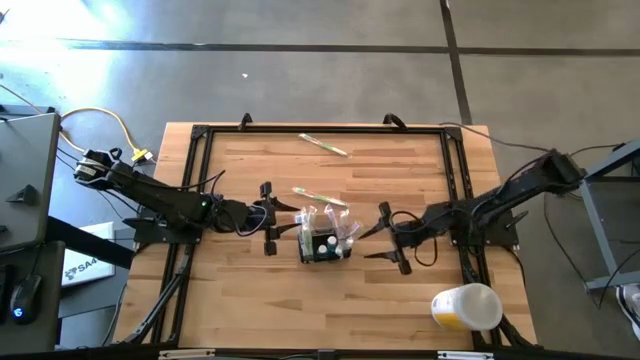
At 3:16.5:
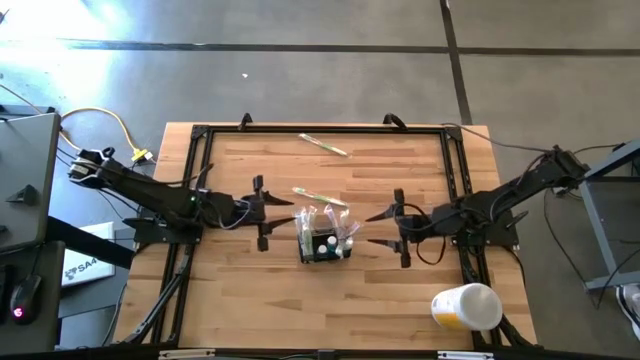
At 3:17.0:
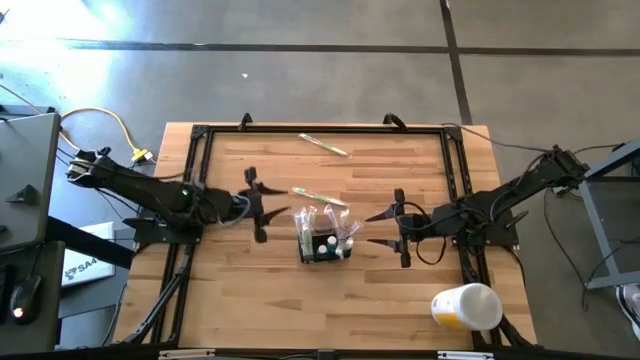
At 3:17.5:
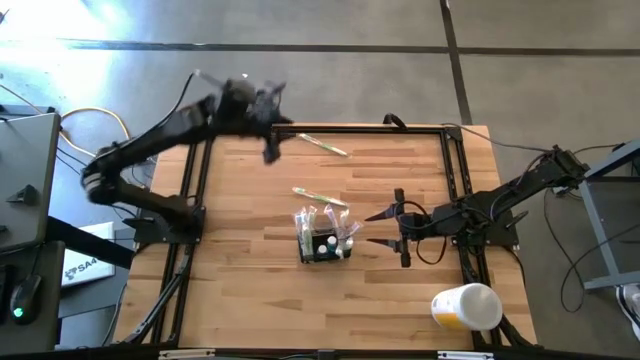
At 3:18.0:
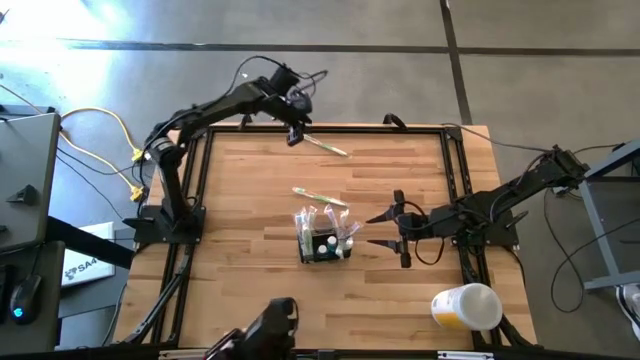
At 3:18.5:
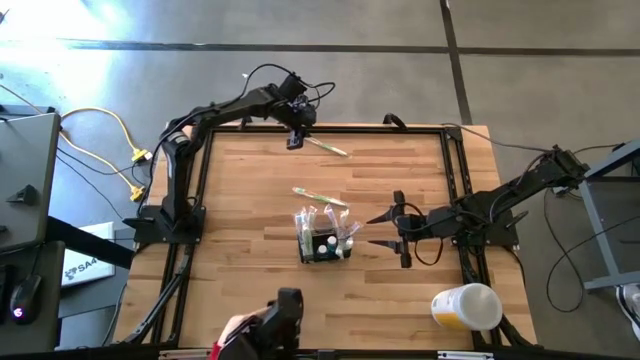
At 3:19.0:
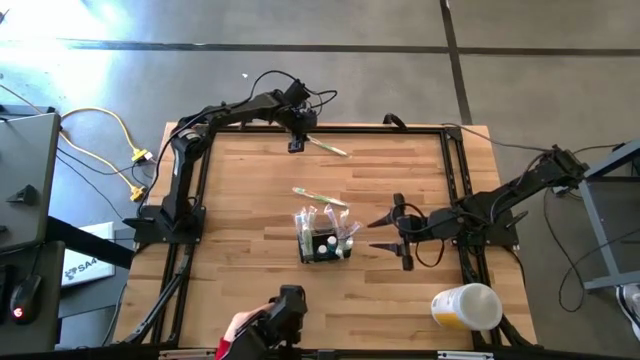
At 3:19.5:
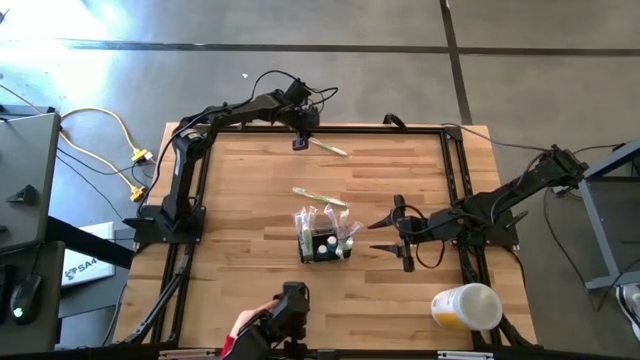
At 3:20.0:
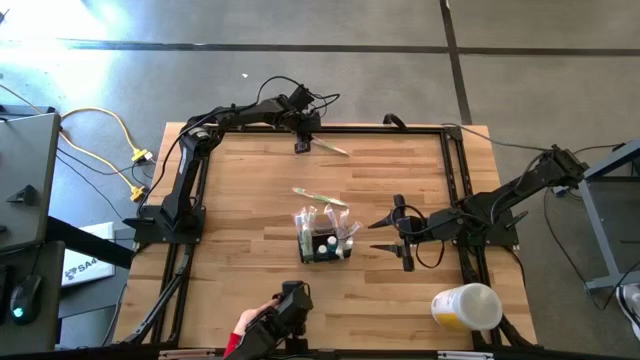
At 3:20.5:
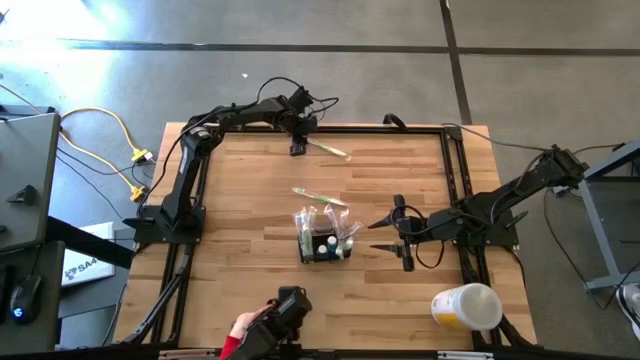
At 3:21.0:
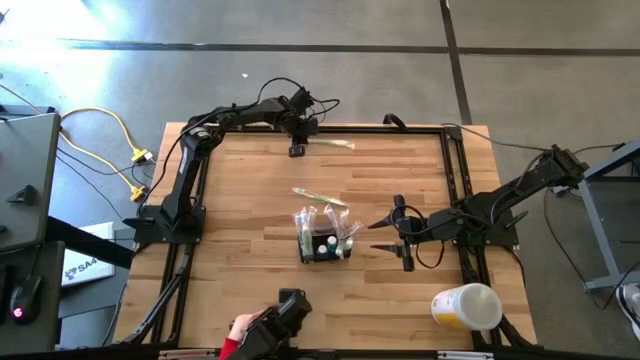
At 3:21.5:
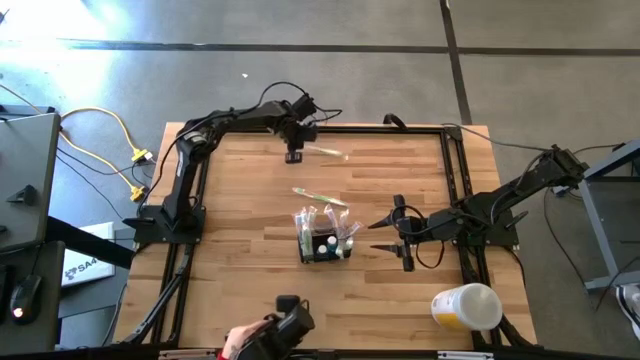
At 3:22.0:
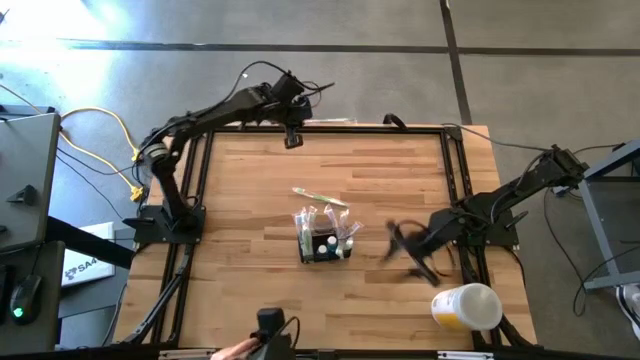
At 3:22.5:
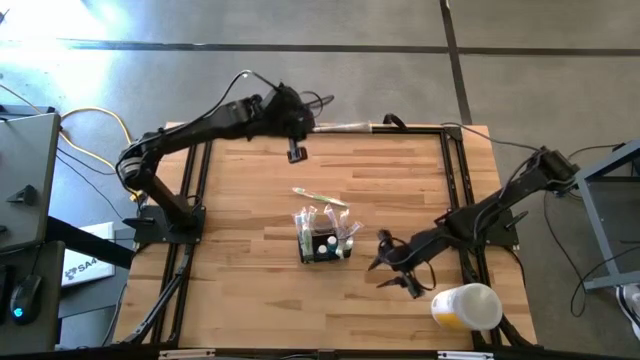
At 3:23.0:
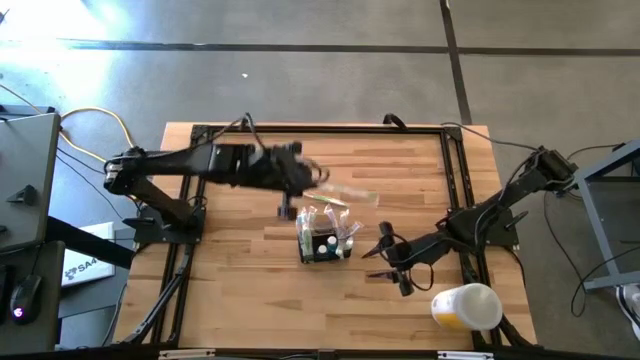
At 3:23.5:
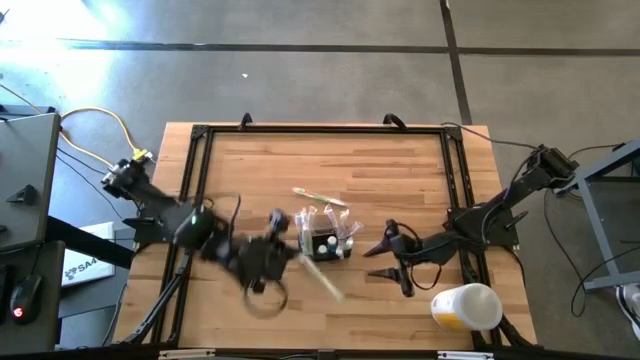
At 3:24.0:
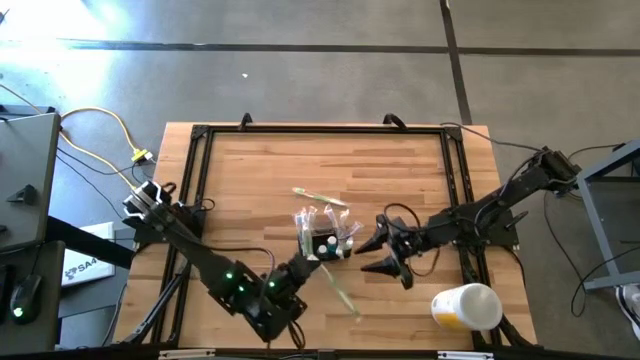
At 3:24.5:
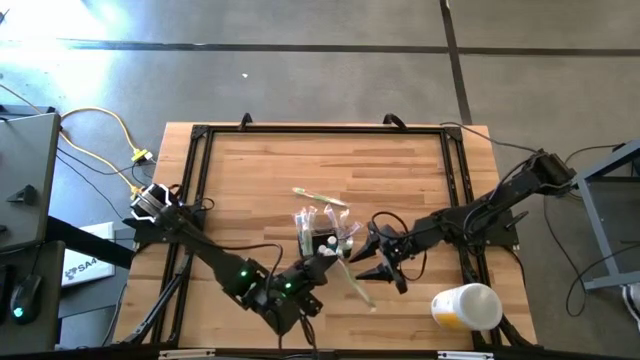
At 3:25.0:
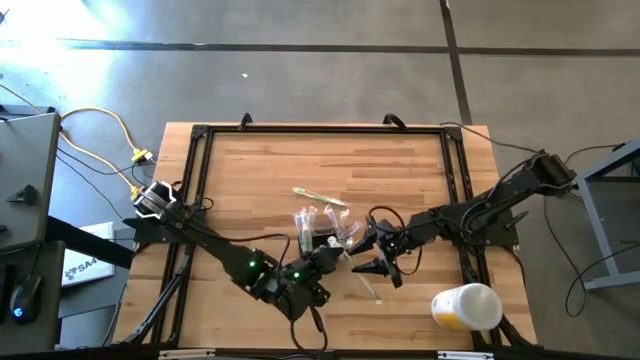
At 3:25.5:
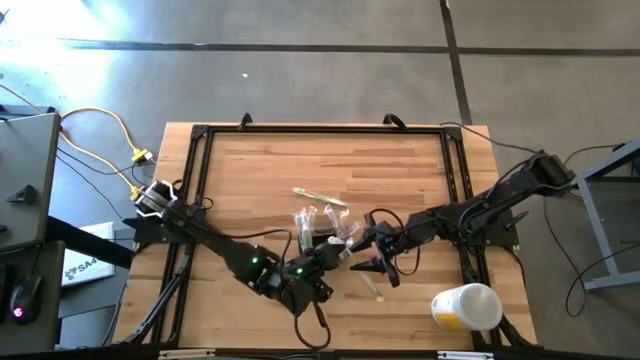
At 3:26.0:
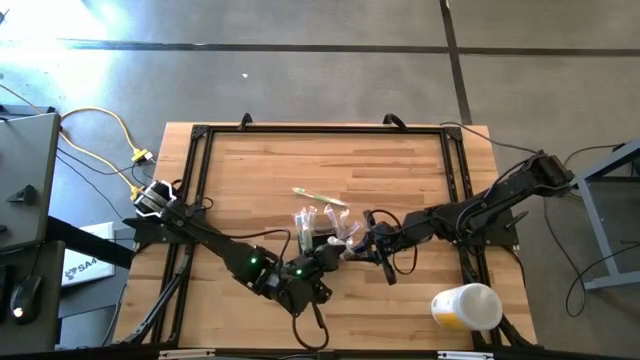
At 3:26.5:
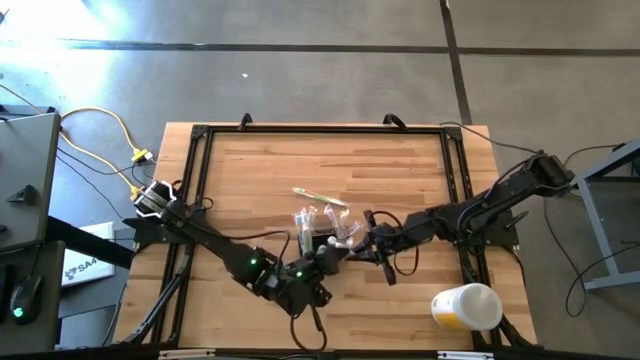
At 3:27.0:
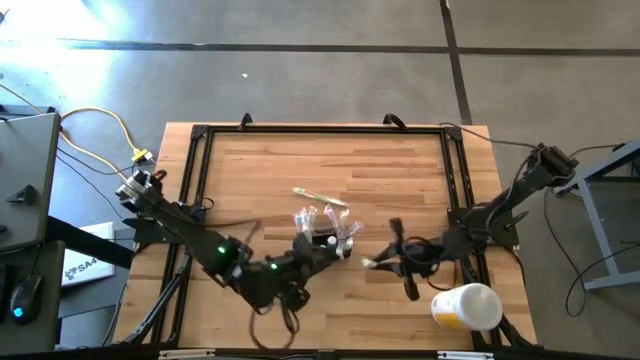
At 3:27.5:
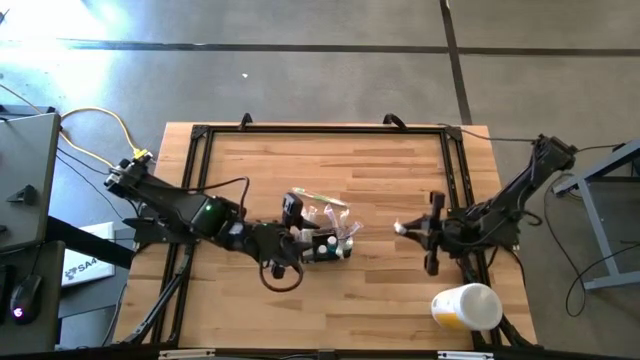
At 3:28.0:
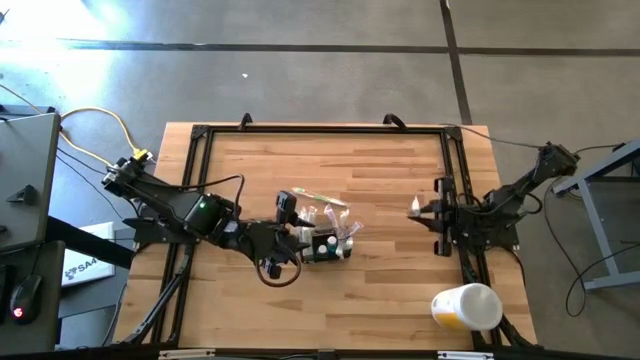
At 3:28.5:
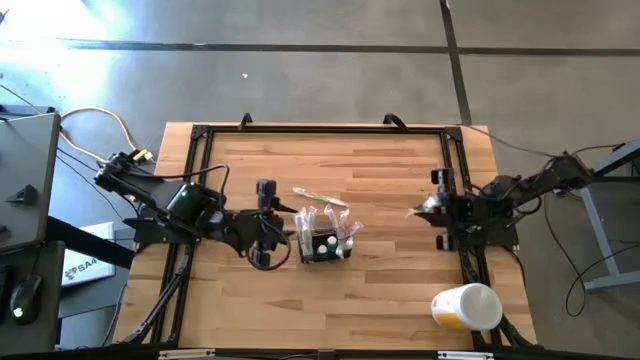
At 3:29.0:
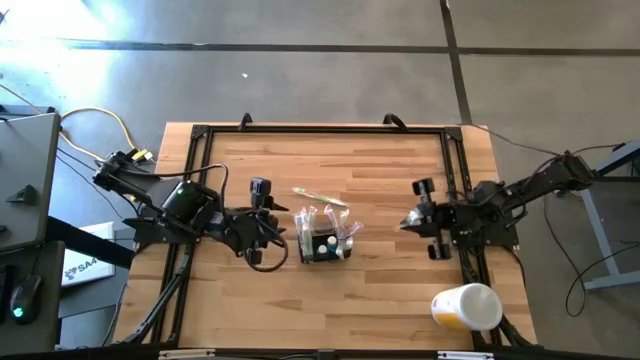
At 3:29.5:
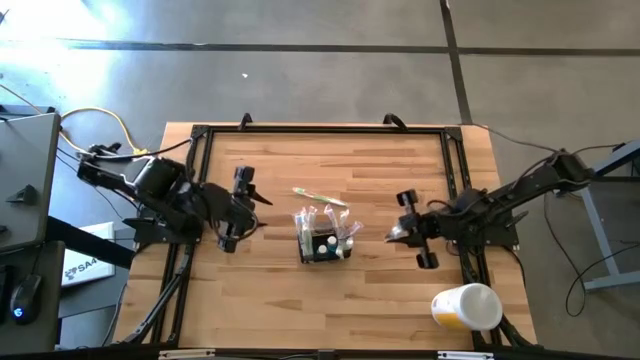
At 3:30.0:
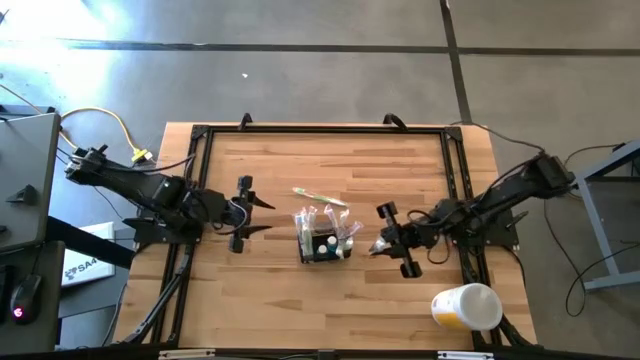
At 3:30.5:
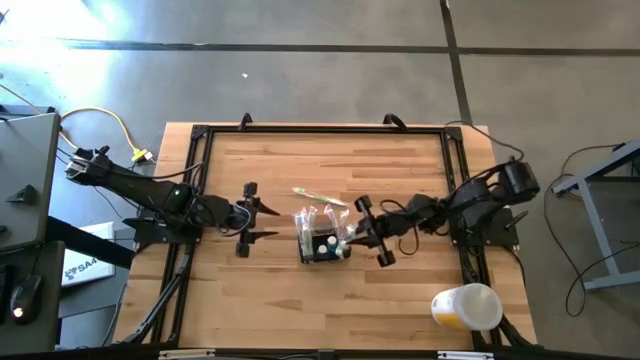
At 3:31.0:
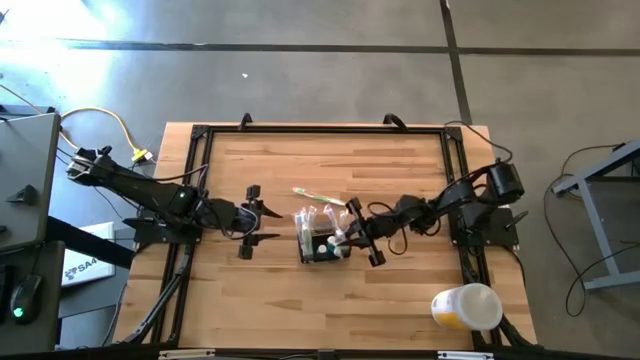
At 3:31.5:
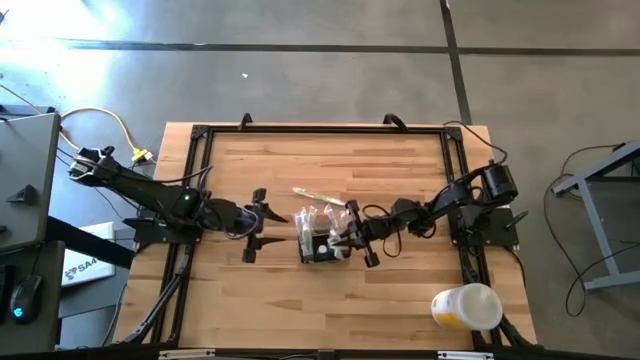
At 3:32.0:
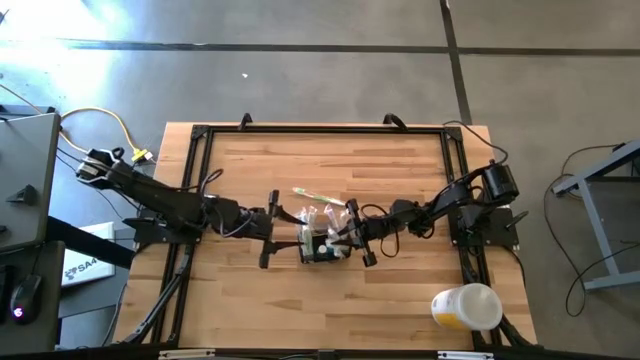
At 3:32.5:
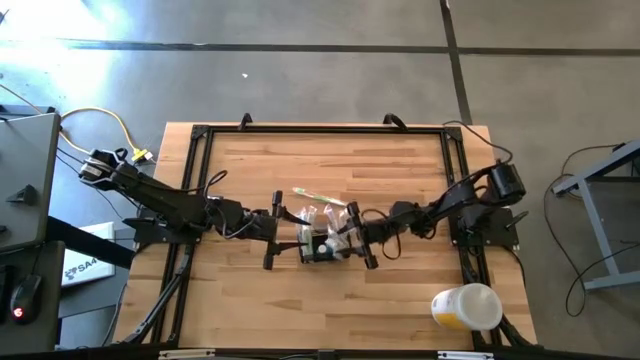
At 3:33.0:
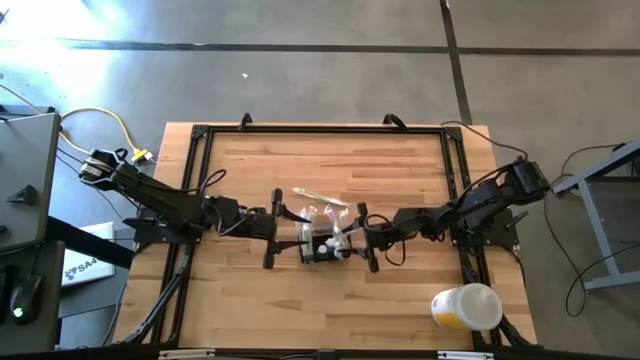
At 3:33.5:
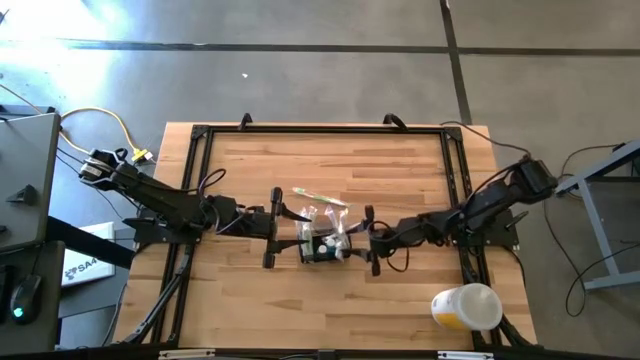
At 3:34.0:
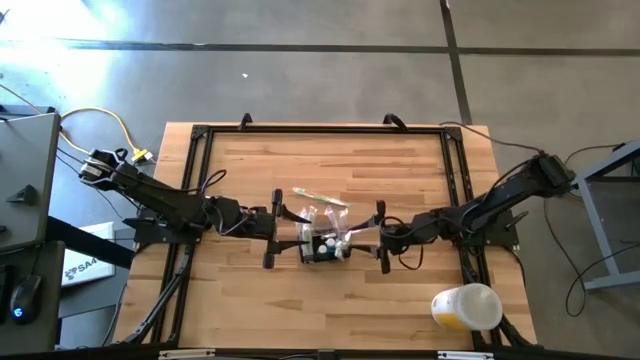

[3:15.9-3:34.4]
Task: Pick & Place toothbrushing station
Put the green toothbrush into the wire organizer

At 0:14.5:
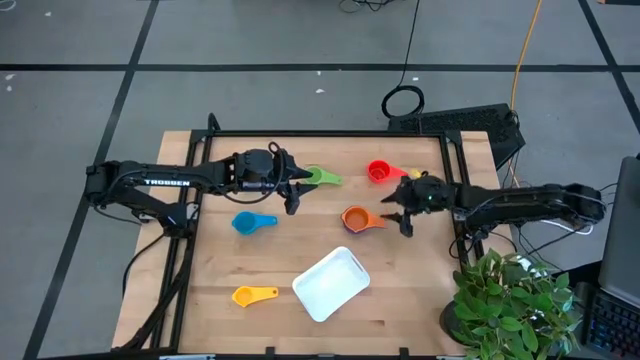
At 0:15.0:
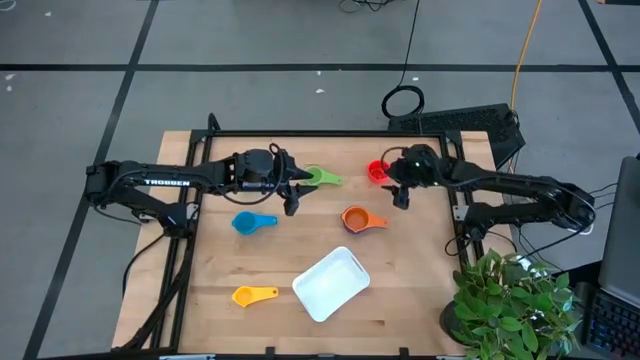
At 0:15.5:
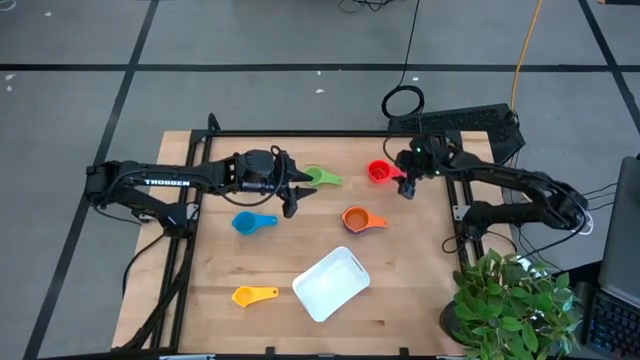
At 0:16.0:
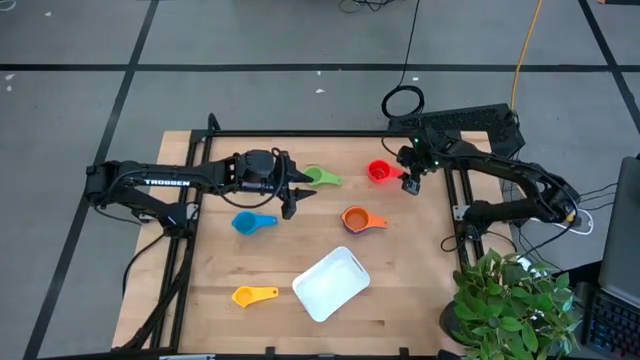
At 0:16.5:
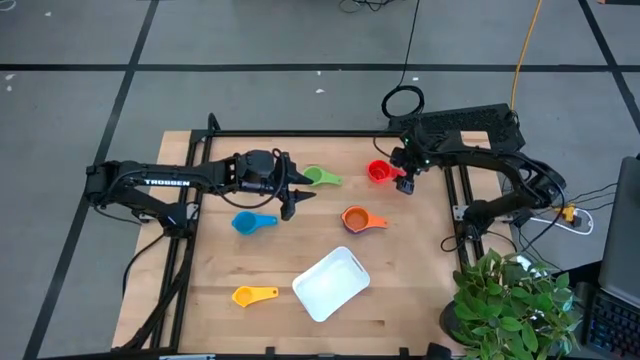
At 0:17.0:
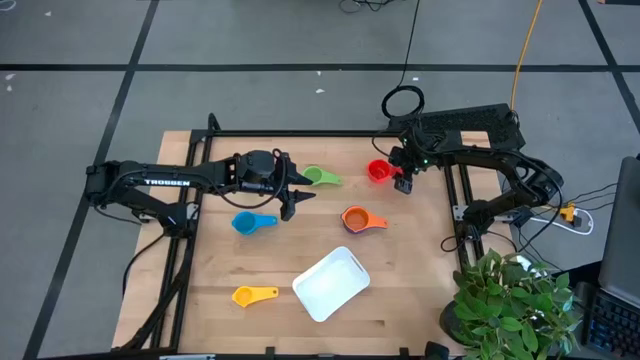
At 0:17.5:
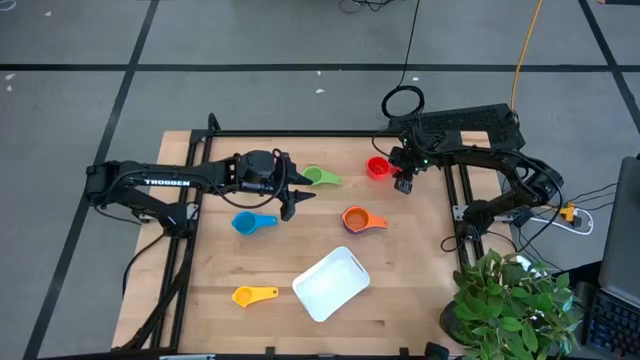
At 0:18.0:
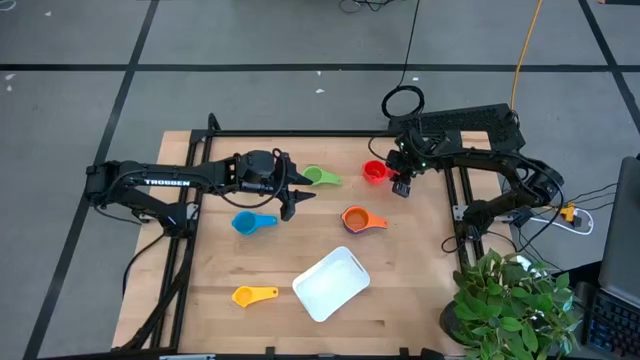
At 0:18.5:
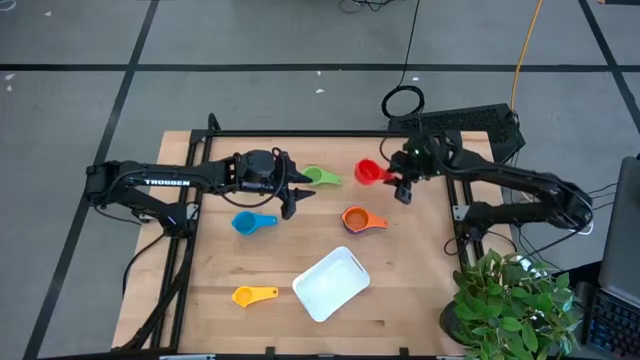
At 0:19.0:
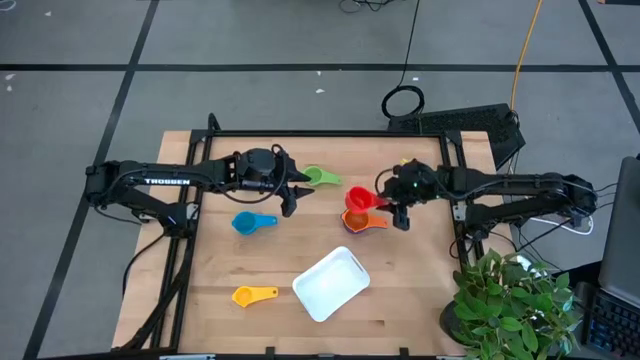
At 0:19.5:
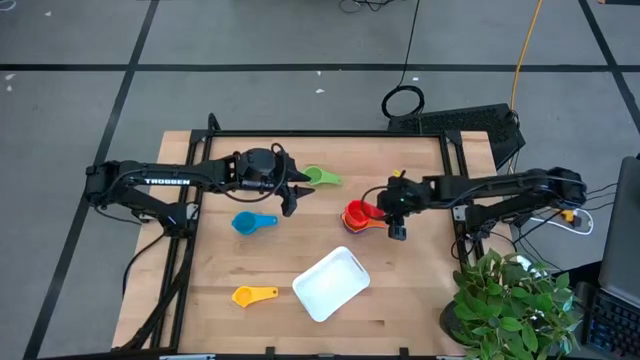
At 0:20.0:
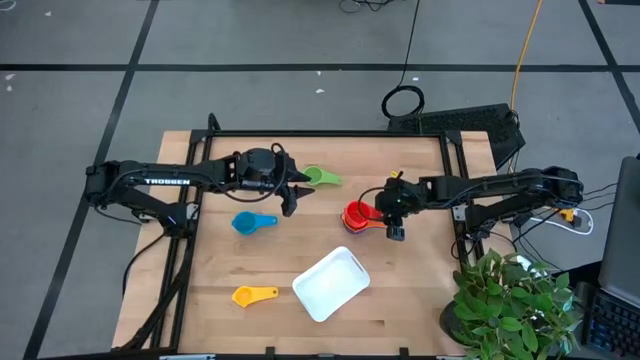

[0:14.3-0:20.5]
Task: Nest measuring cups in basket
Stack the red measuring cup on top of the orange measuring cup
